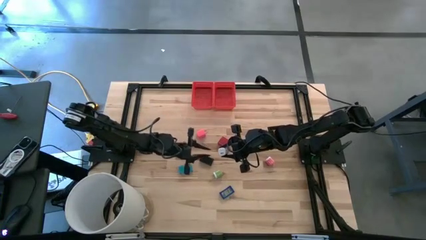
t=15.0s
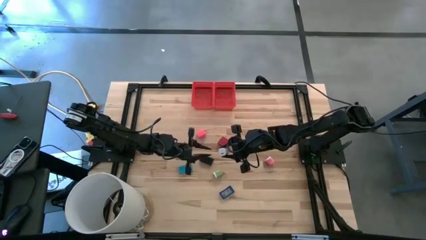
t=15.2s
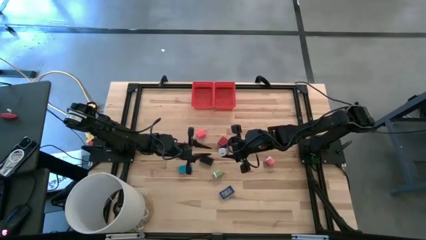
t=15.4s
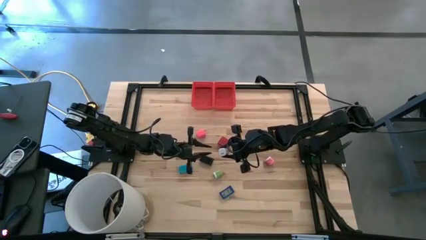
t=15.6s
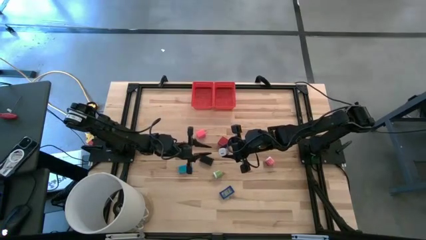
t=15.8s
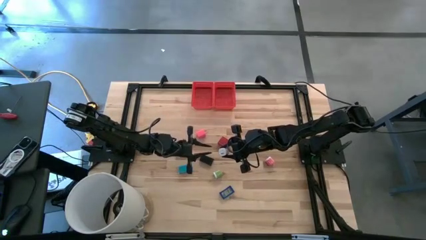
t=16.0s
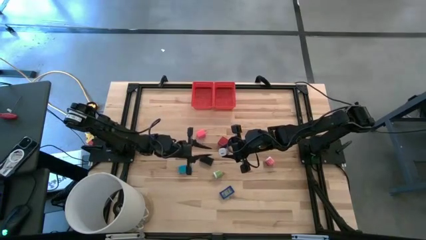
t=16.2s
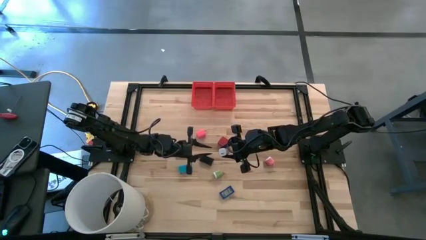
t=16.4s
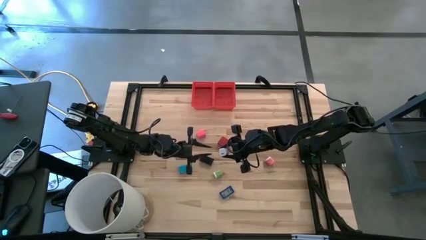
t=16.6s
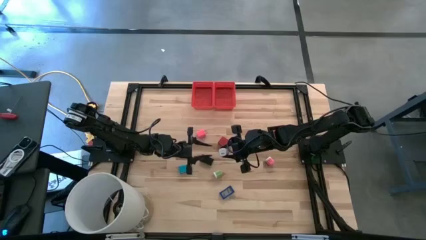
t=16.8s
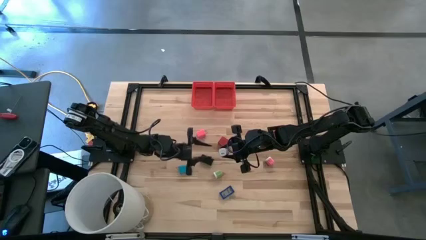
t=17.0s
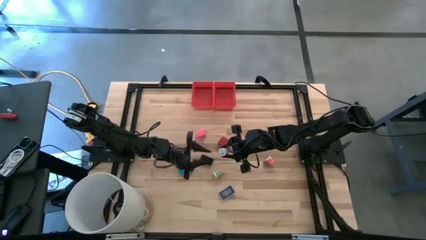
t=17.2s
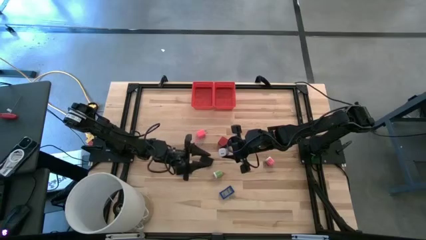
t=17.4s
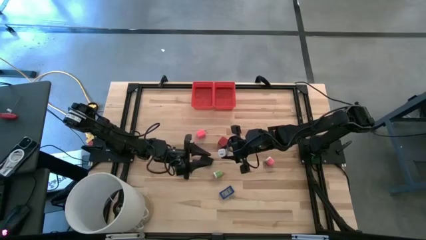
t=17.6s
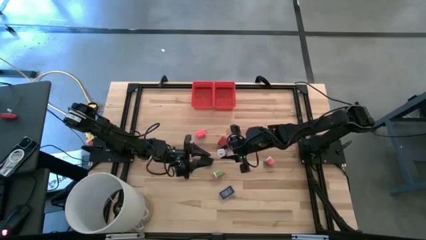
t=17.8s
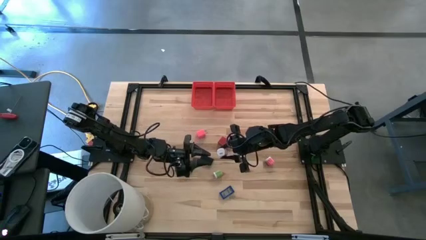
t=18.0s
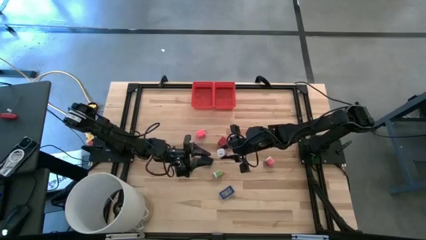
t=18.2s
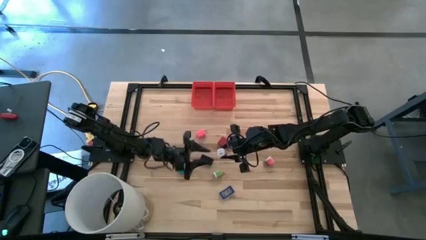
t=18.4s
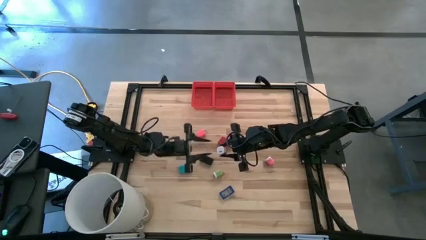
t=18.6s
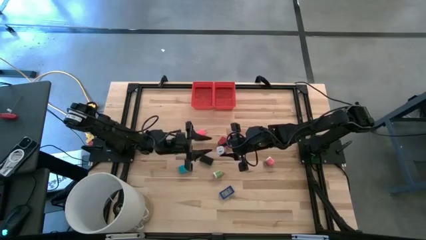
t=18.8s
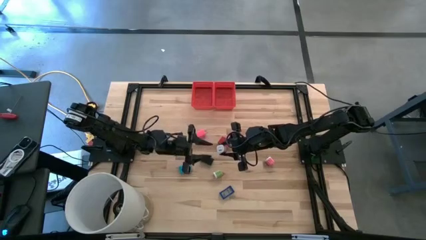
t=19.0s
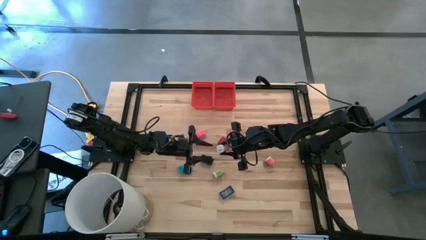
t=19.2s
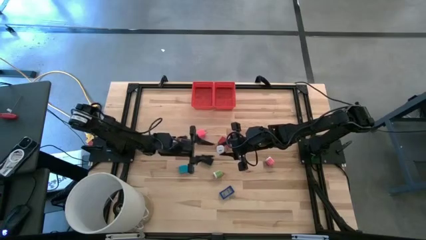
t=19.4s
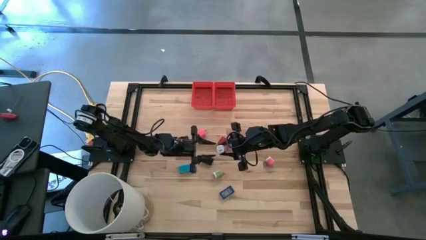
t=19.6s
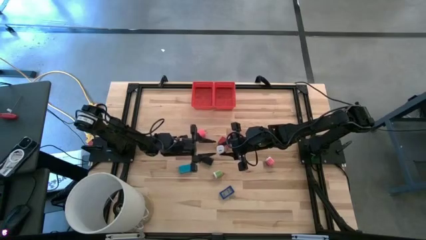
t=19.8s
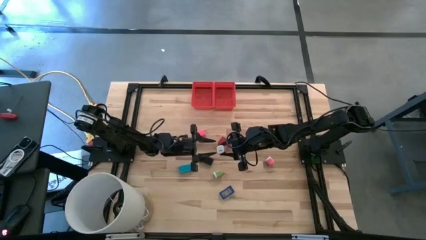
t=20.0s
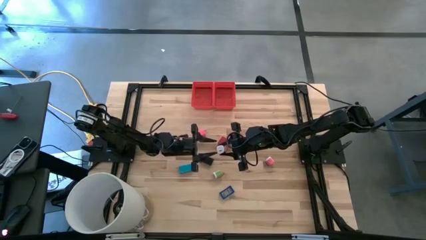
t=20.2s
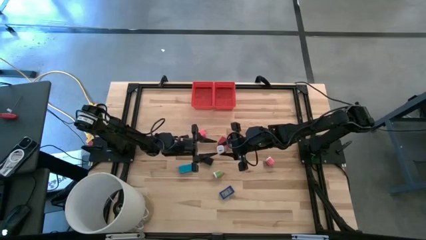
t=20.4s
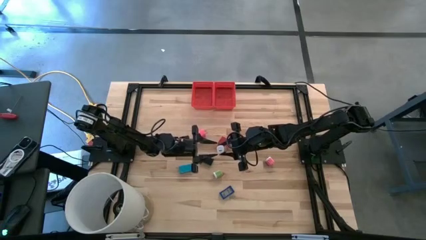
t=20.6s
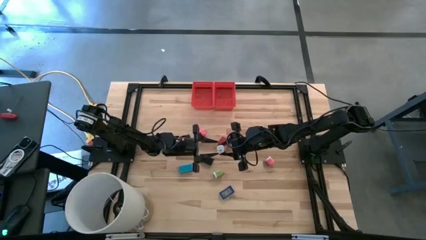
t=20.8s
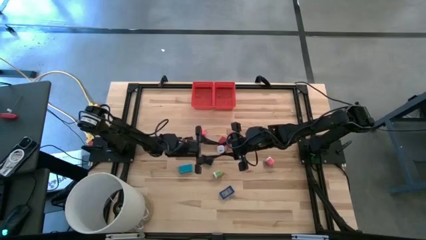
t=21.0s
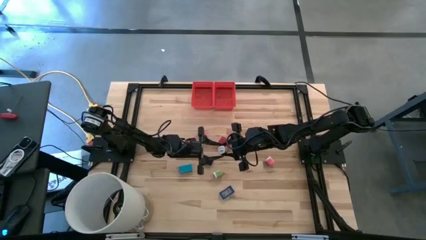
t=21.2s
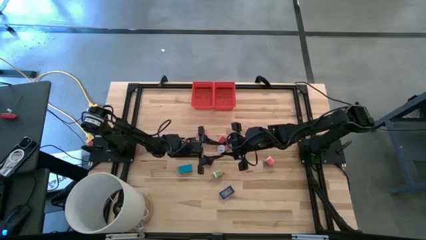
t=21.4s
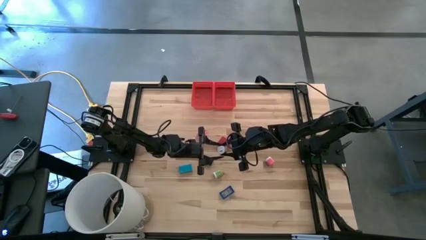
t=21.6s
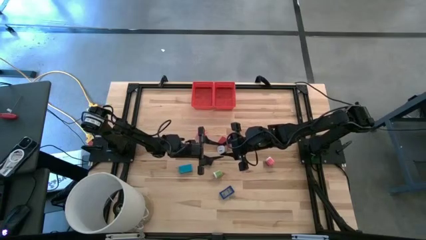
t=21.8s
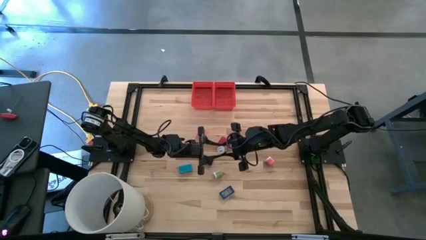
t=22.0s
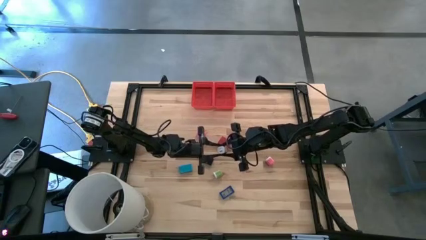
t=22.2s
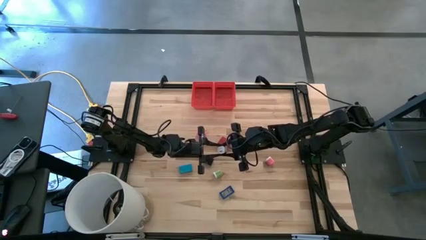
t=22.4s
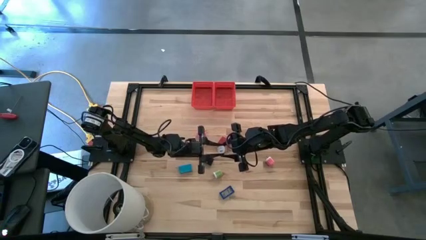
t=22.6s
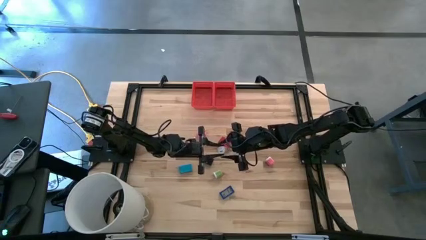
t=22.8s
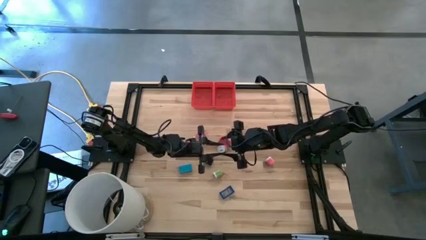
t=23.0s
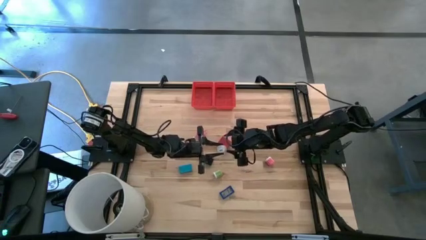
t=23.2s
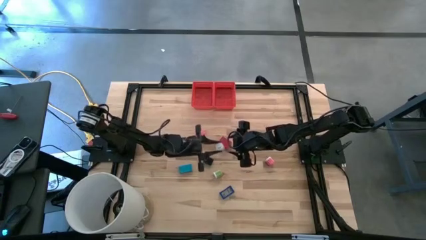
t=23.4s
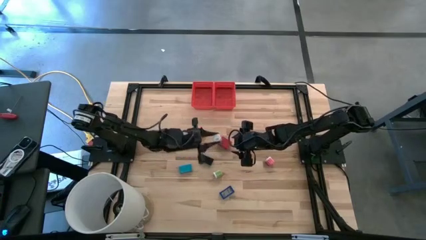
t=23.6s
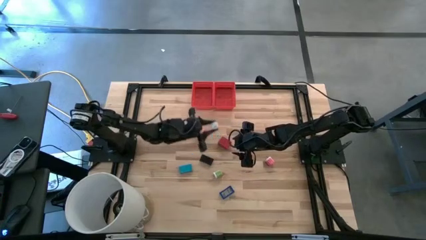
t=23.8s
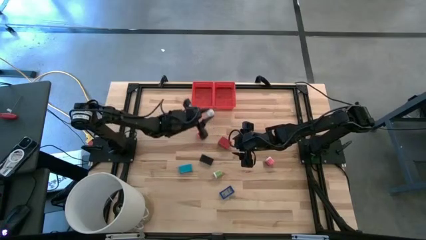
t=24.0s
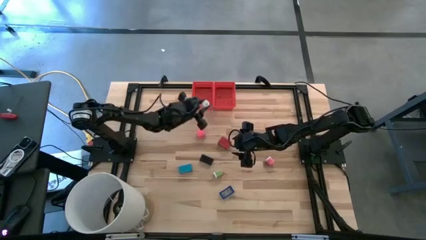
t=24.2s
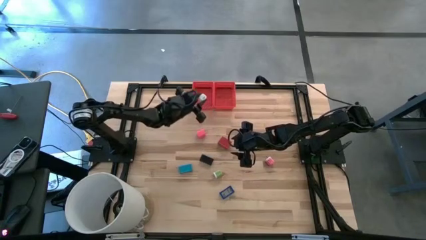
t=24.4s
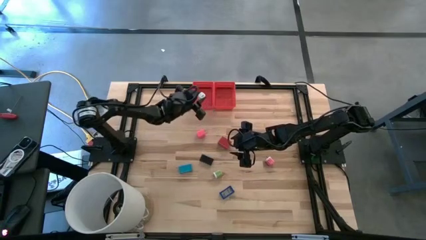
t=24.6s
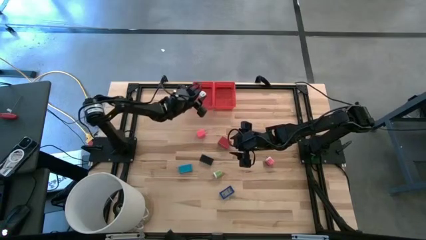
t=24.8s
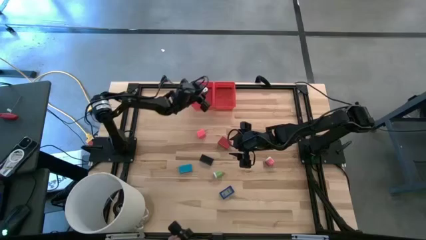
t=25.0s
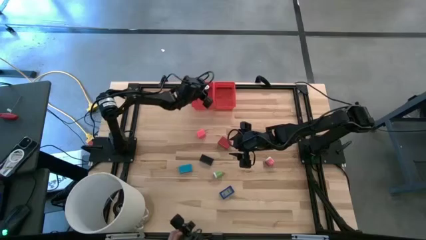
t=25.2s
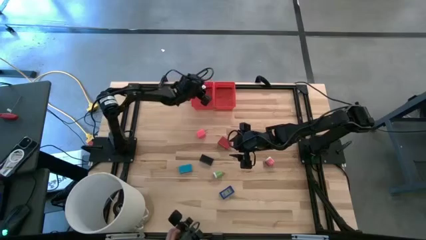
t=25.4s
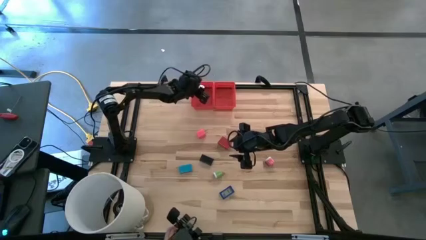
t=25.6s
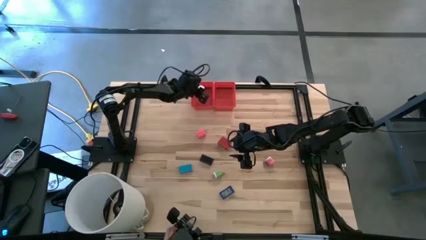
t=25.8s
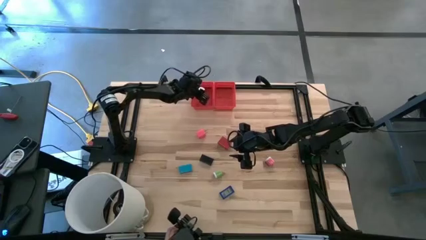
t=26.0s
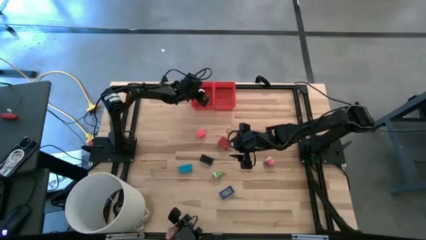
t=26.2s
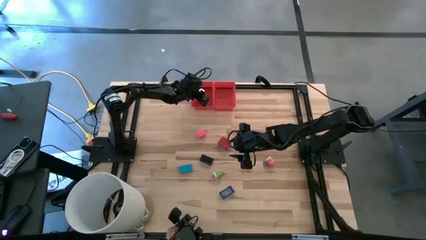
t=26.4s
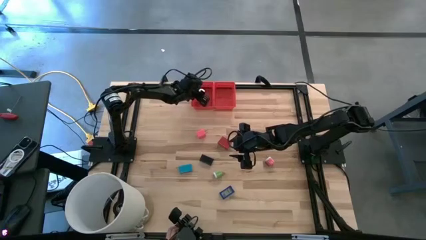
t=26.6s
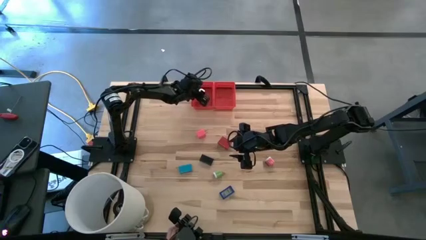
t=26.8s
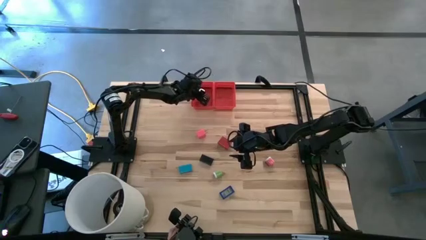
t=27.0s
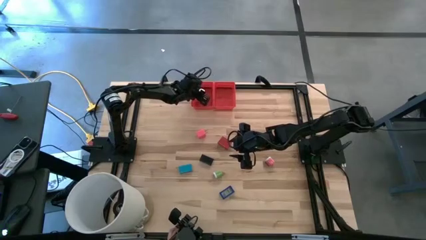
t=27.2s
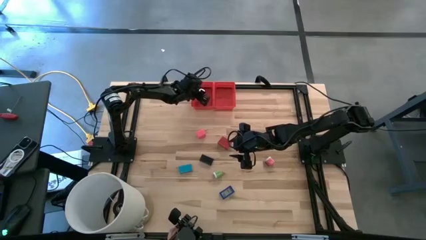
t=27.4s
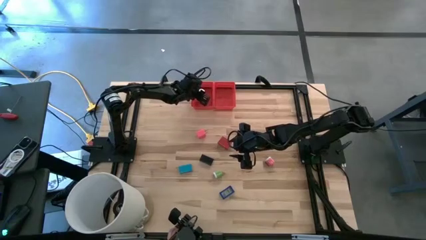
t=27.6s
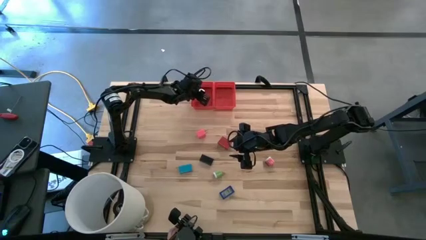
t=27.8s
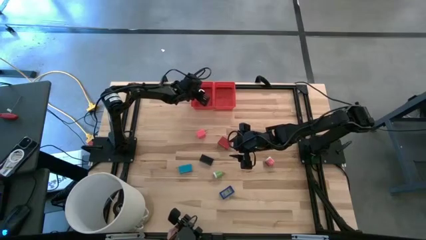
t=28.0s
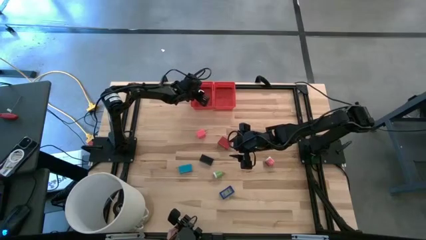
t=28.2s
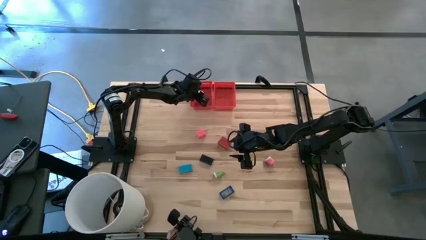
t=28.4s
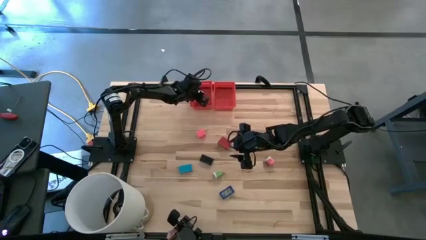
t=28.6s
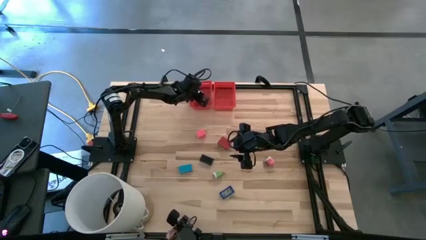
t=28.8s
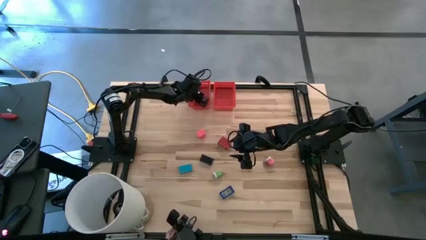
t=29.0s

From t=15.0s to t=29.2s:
Task: Pick & Place Office items
Put the white charger adapter into the left red basket
